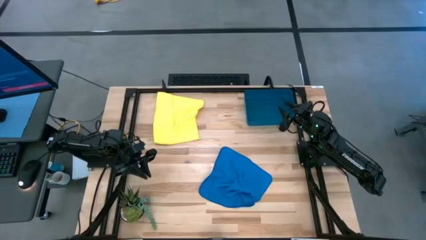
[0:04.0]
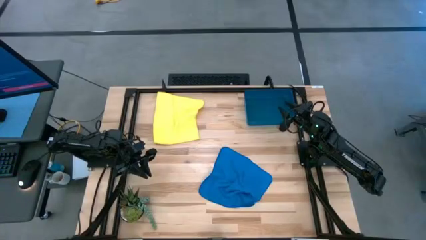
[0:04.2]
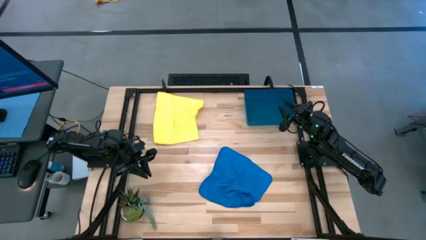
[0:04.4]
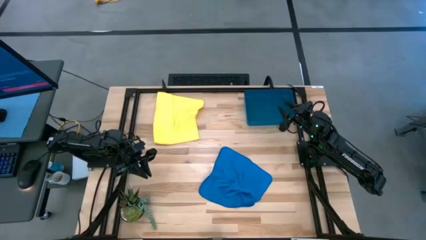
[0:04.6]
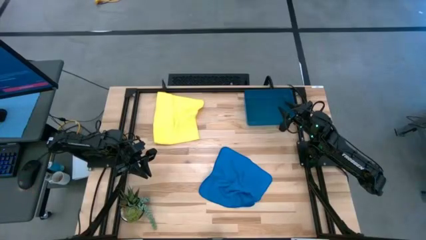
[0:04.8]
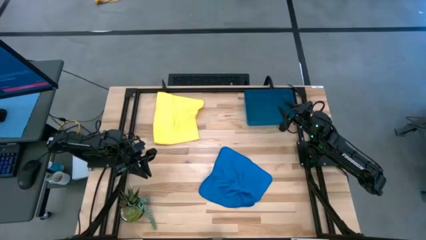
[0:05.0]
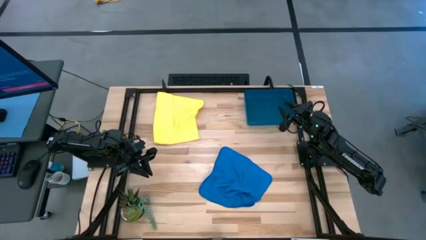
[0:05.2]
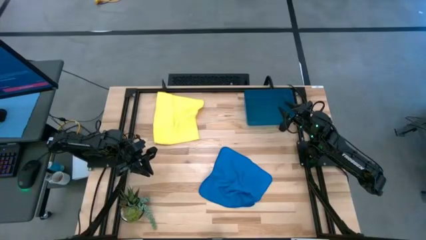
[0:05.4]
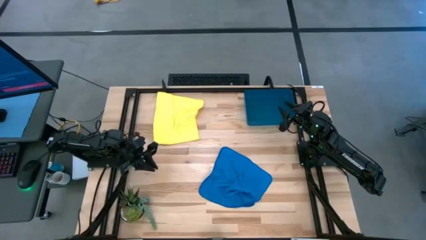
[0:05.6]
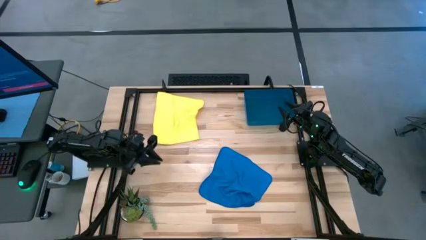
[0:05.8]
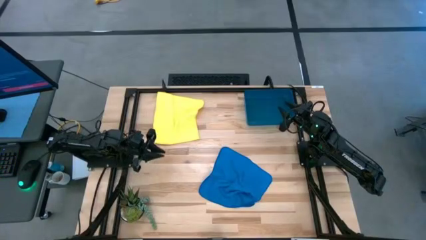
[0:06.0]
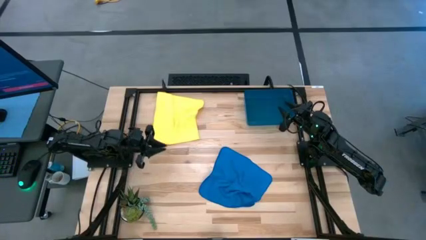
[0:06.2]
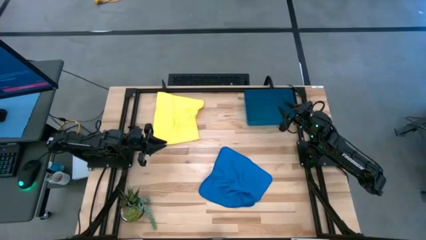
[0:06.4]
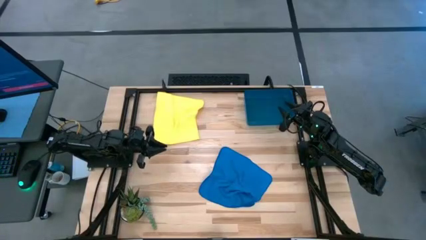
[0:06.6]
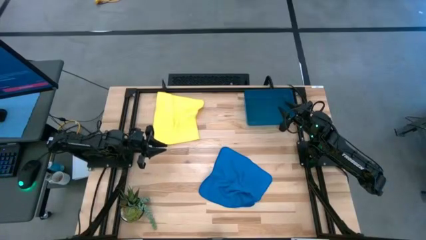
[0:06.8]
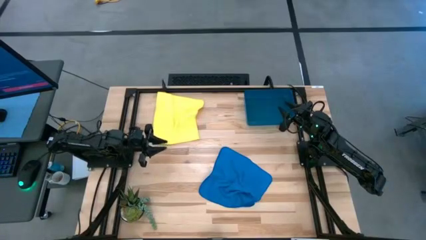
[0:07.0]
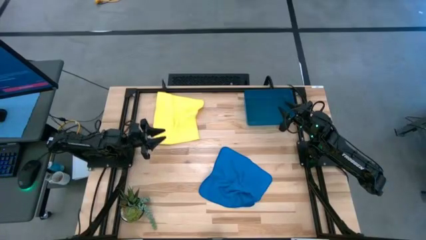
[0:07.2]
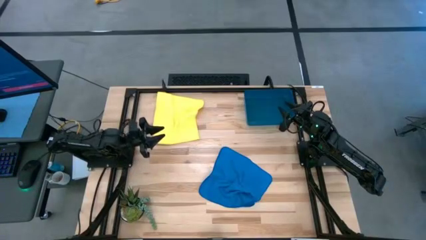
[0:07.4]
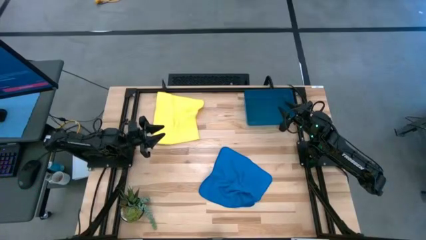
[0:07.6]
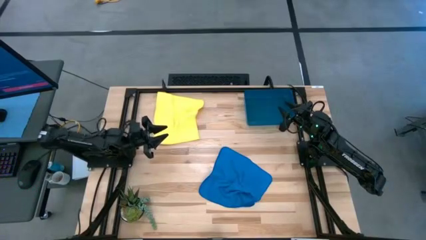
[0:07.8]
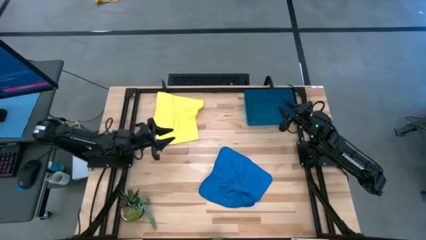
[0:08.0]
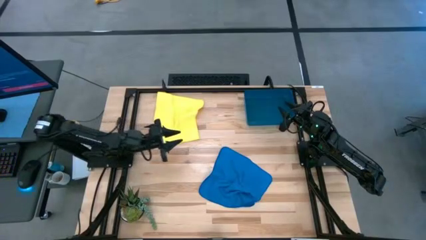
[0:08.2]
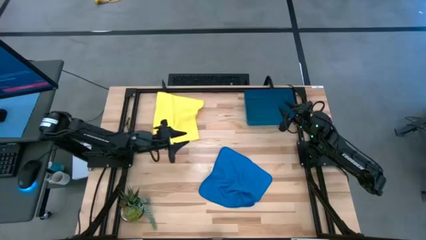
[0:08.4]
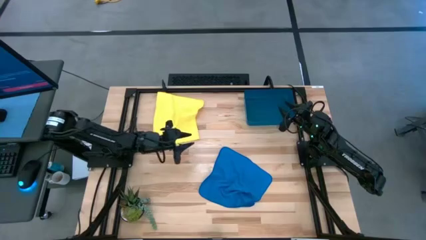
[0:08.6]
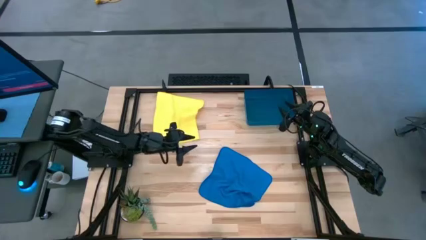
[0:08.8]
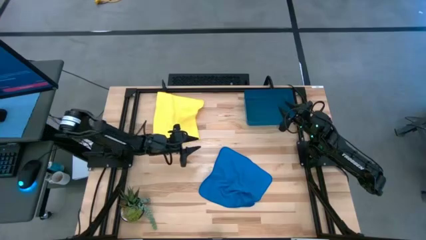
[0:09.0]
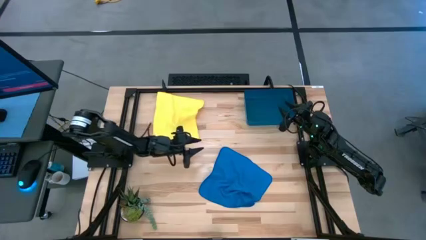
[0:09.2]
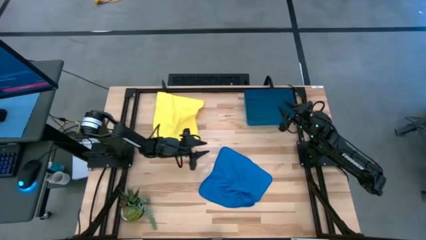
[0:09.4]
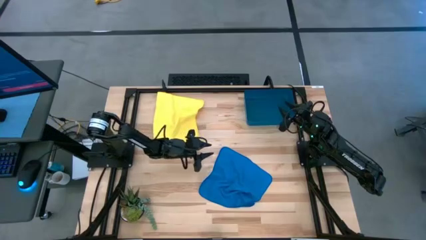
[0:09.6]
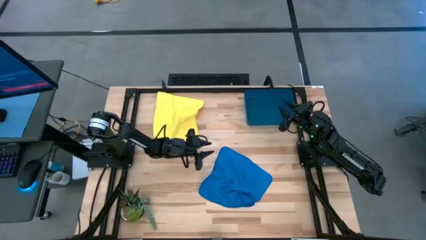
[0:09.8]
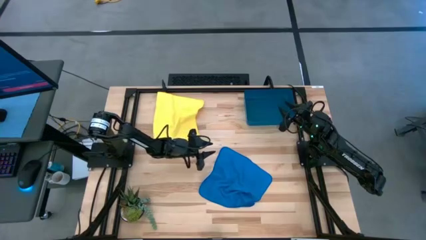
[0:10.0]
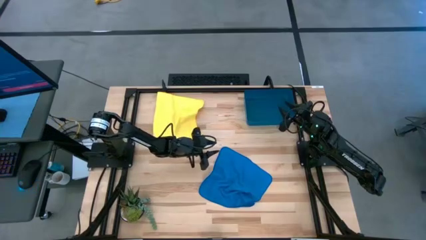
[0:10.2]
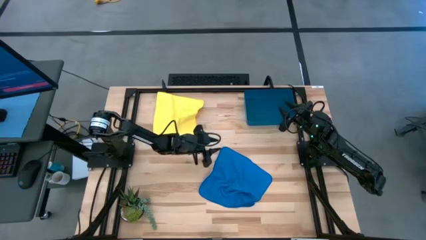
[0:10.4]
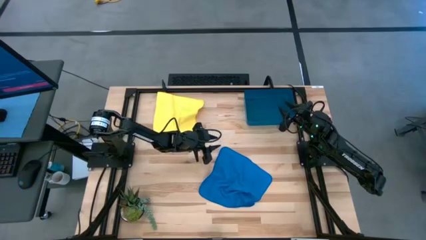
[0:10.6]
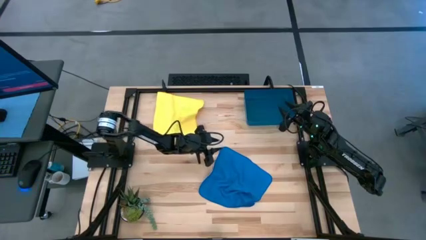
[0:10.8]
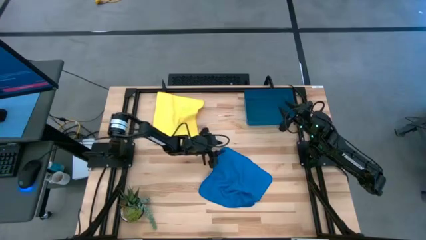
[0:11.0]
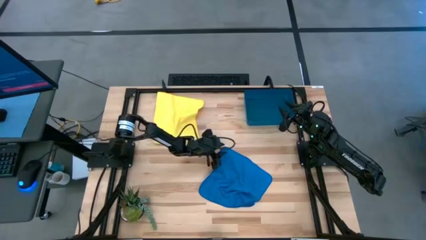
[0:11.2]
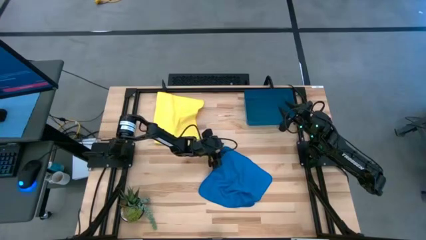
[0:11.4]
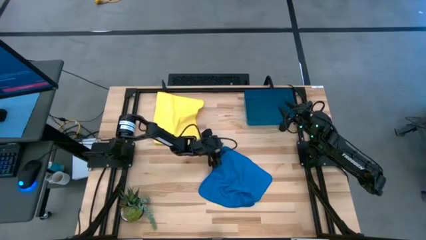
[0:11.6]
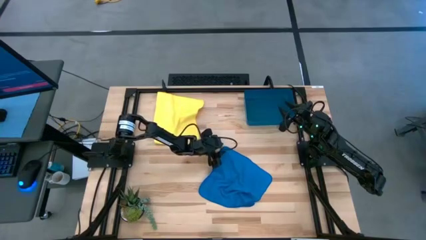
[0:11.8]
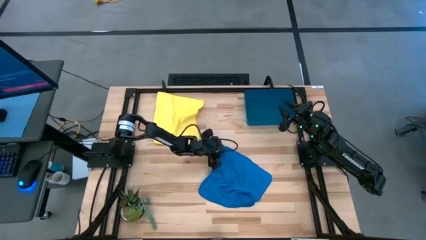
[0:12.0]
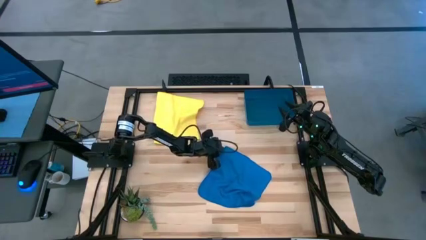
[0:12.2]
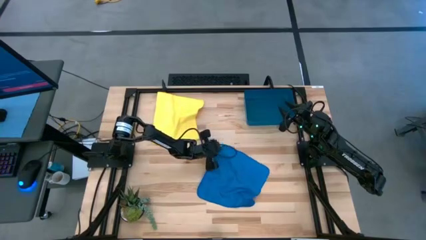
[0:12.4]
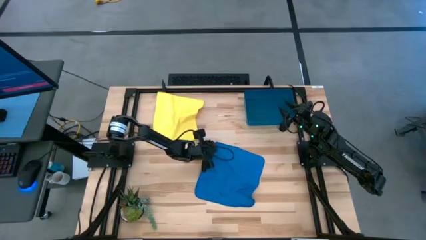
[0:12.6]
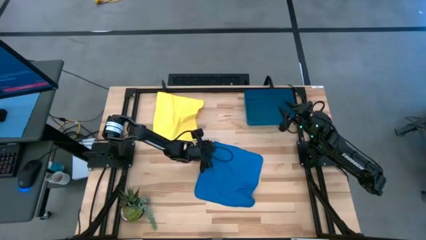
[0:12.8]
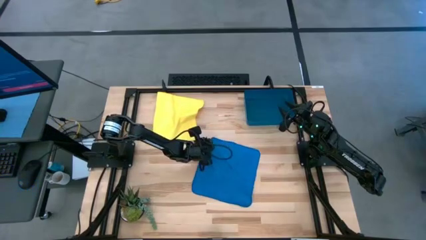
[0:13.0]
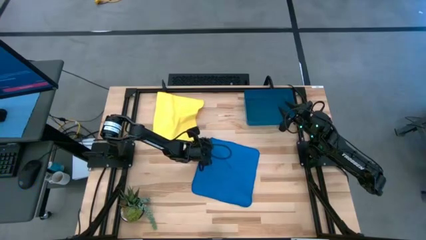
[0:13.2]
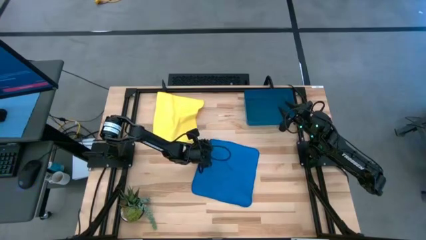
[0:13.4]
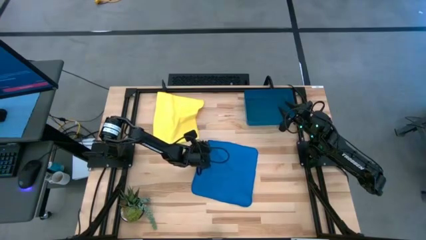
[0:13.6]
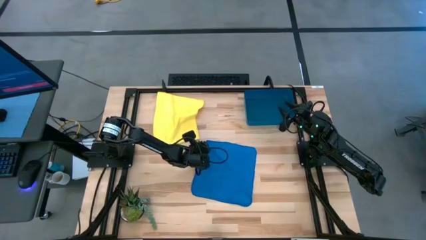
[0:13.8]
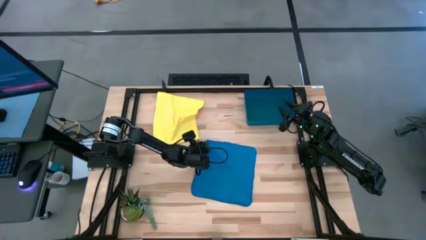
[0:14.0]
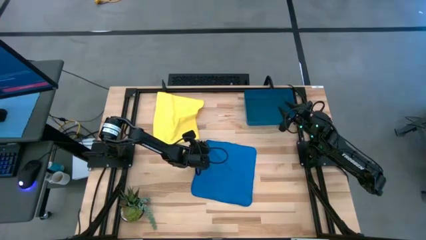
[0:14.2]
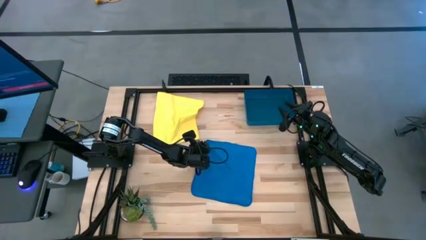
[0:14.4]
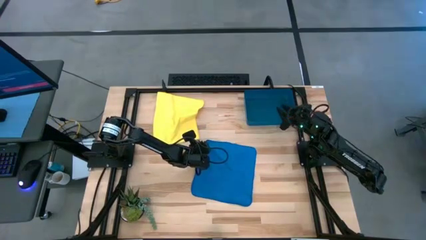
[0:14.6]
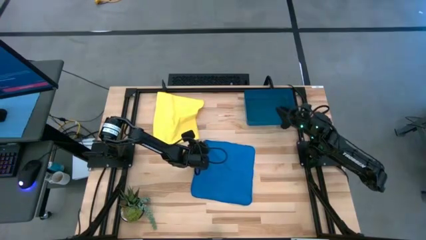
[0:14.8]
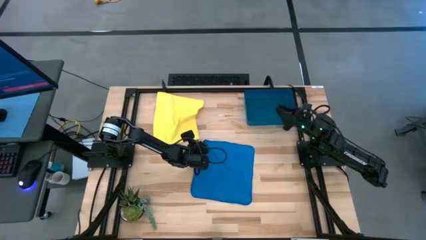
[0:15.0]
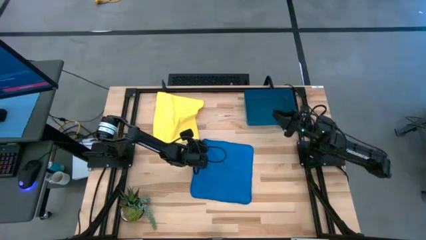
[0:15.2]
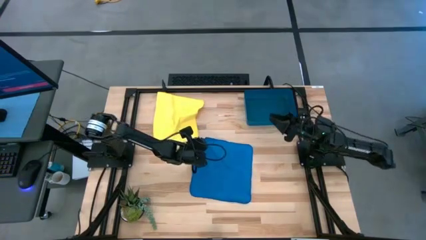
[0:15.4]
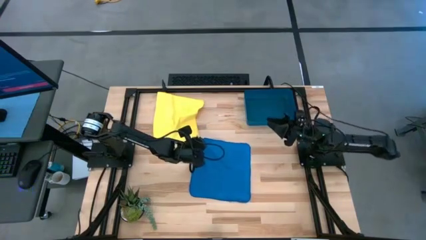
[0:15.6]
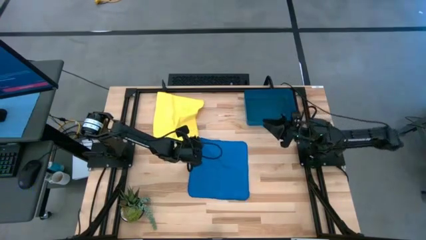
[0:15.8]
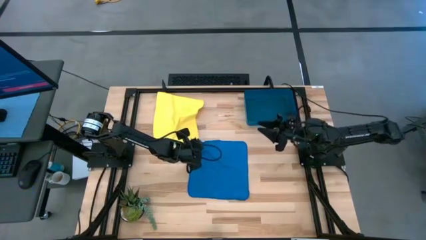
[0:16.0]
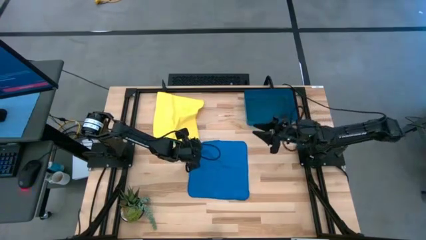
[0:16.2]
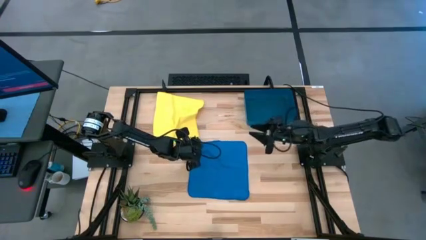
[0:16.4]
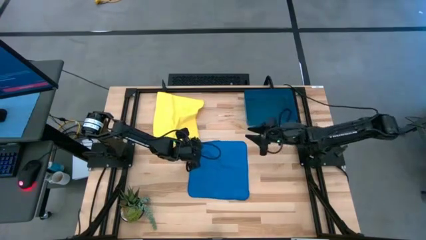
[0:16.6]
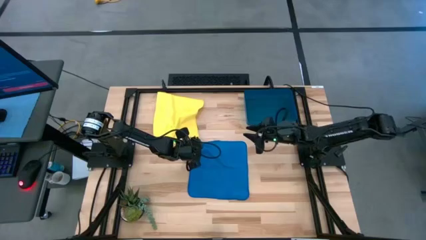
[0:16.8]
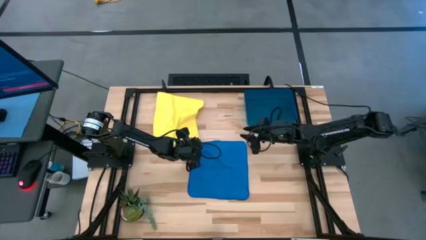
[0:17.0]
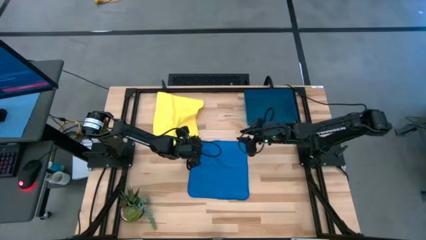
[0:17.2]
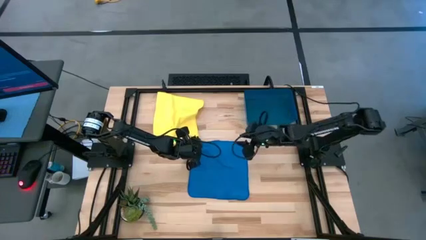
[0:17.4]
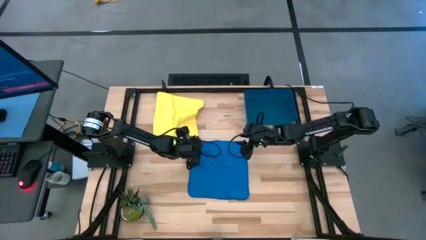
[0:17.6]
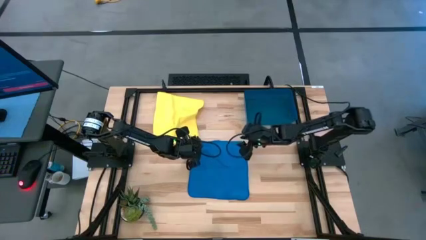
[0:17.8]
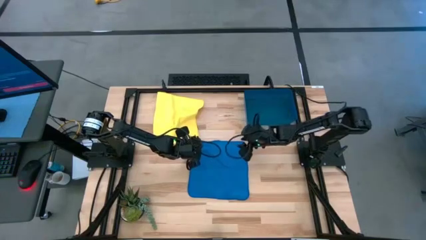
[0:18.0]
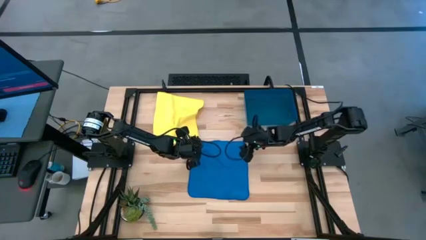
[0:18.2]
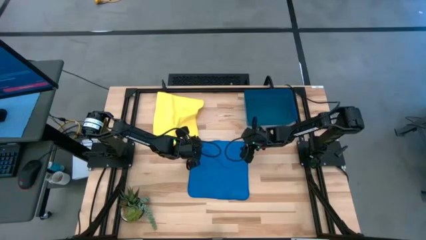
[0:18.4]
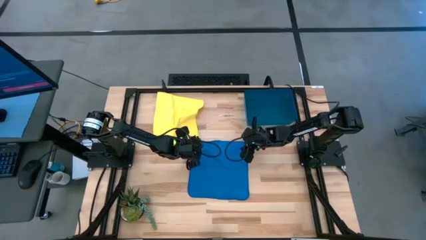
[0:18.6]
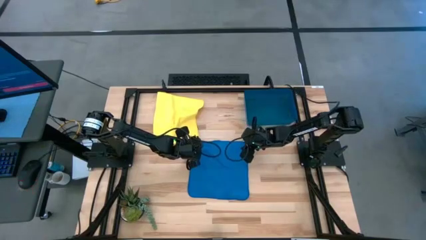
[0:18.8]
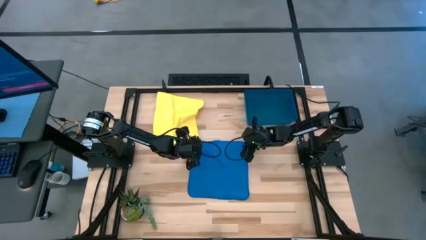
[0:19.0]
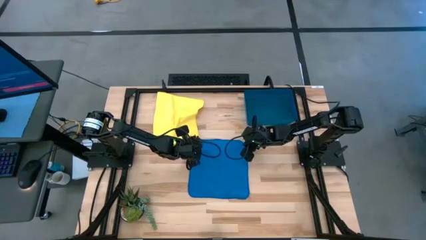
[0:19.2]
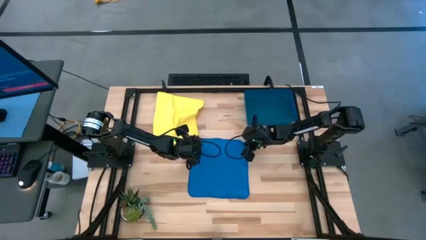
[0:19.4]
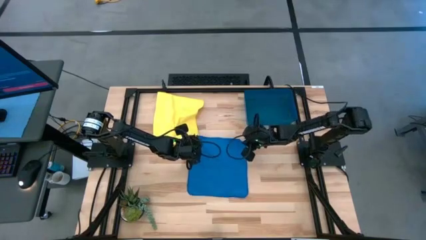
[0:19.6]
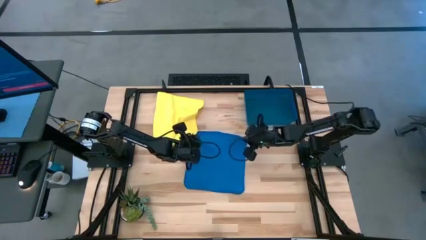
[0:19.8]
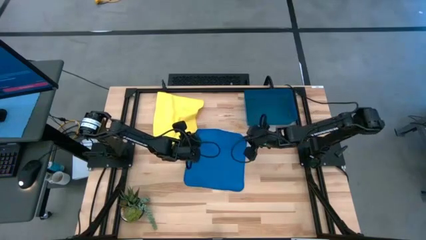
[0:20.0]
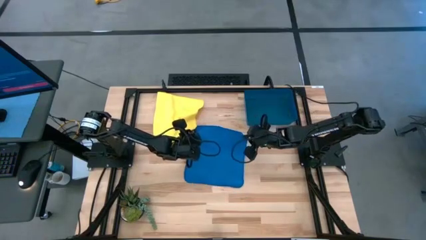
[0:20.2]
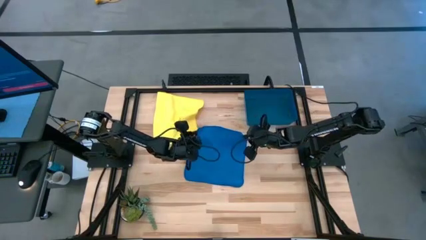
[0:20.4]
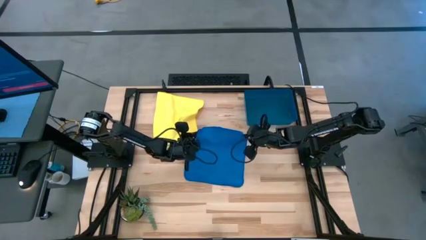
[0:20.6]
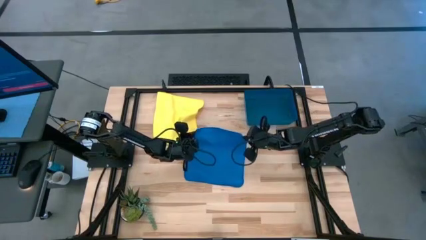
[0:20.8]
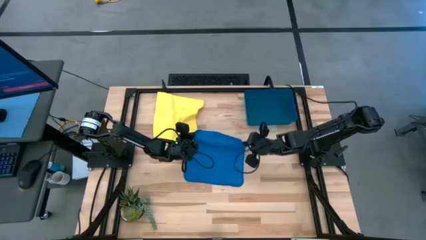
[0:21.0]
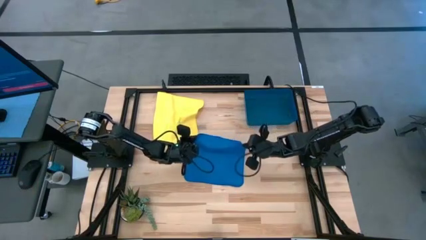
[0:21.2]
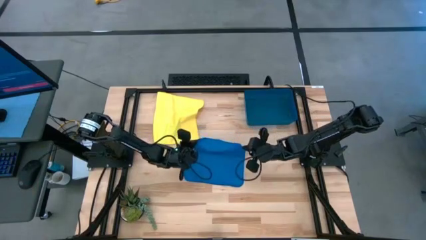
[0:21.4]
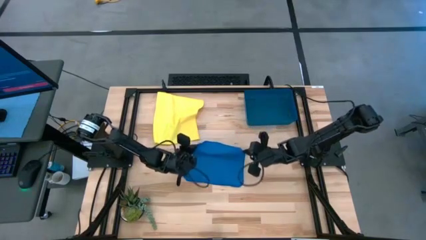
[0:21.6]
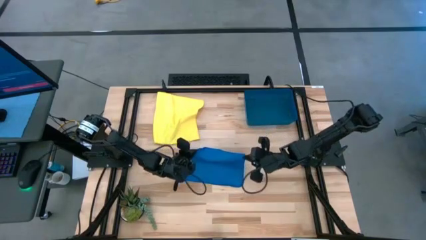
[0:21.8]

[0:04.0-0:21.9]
Task: Roll microfiber towels into tight, uniform cylinder then place into a basket
Roll the blue microfiber cloth
